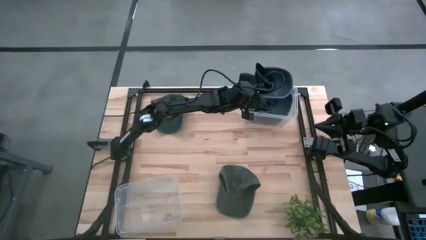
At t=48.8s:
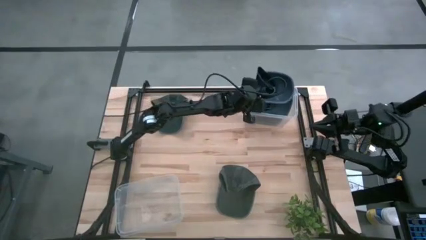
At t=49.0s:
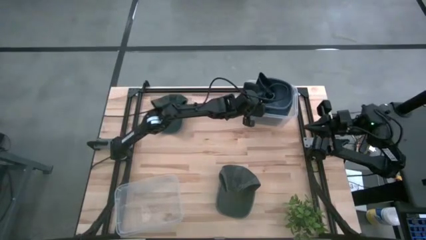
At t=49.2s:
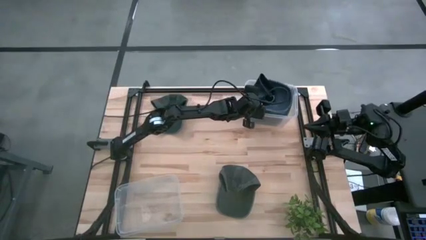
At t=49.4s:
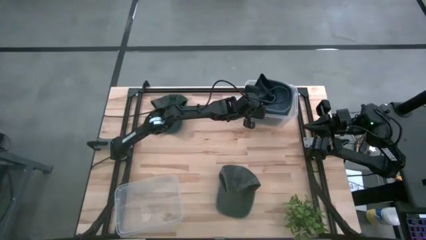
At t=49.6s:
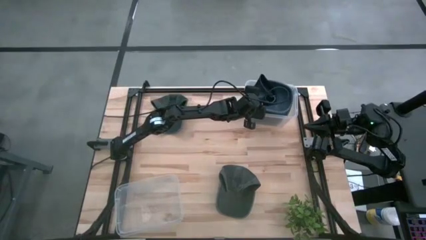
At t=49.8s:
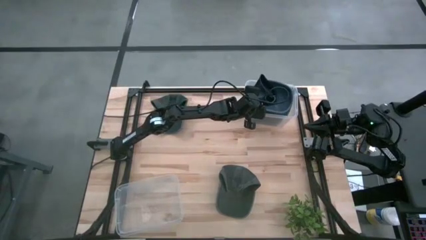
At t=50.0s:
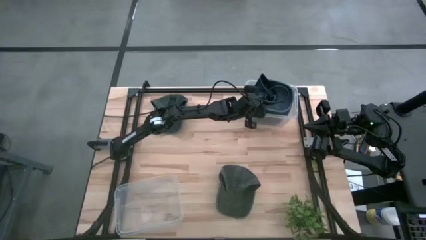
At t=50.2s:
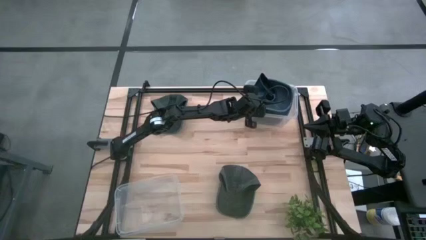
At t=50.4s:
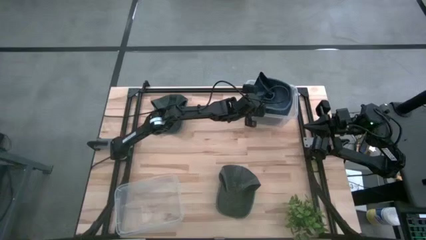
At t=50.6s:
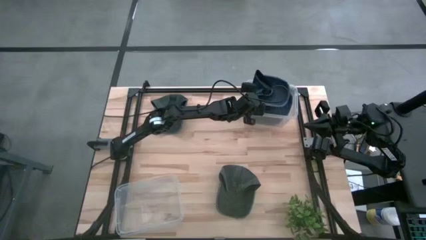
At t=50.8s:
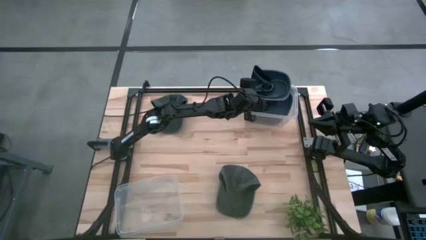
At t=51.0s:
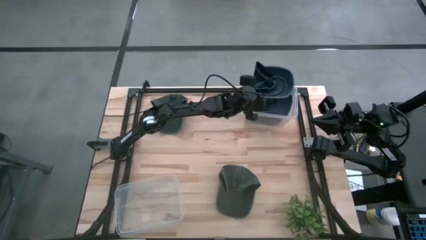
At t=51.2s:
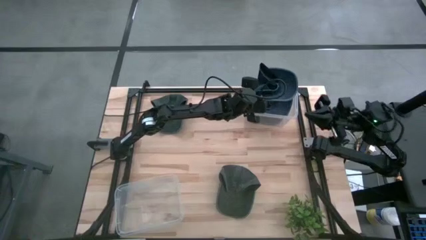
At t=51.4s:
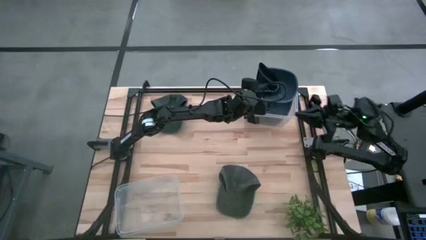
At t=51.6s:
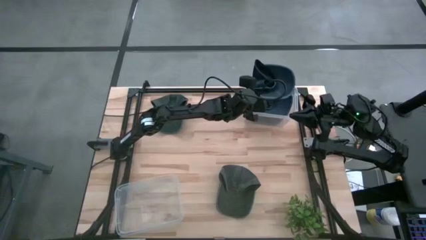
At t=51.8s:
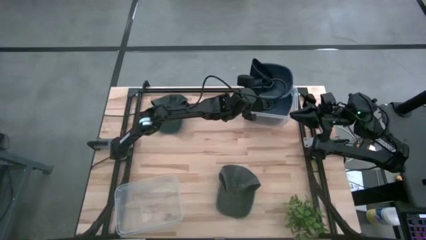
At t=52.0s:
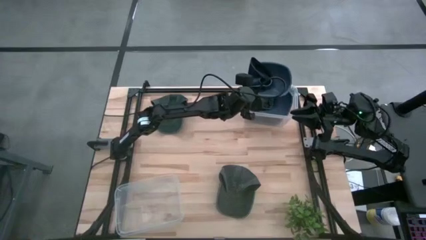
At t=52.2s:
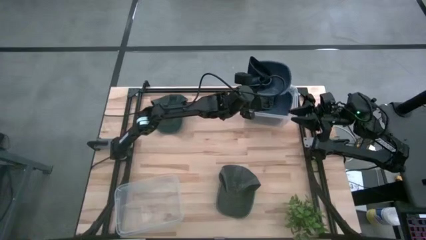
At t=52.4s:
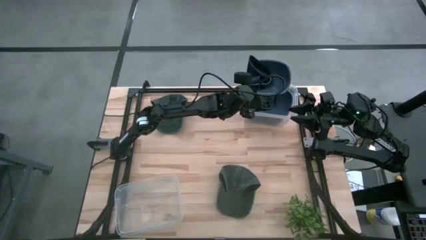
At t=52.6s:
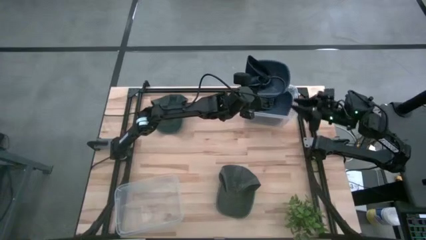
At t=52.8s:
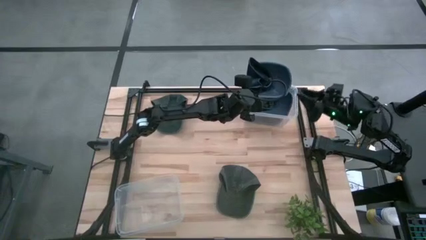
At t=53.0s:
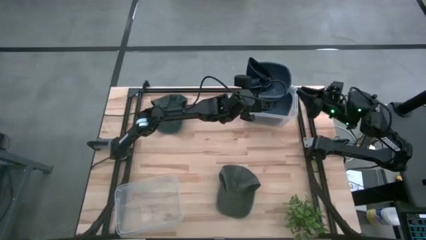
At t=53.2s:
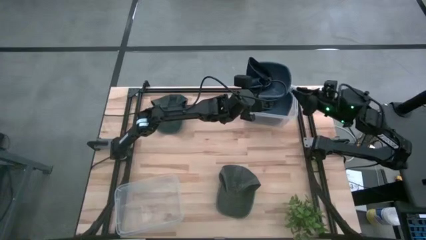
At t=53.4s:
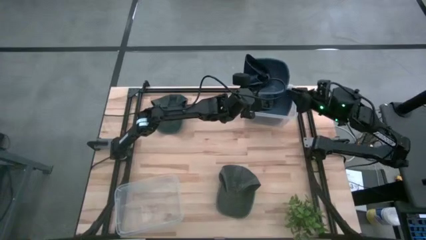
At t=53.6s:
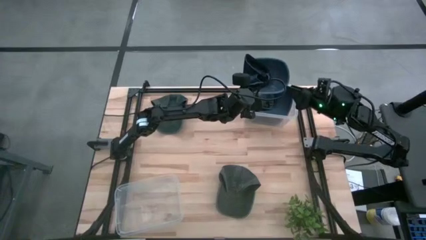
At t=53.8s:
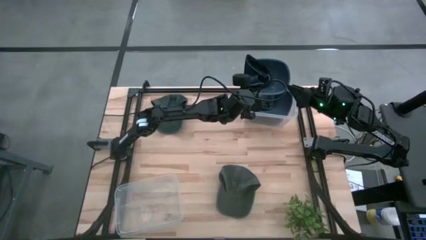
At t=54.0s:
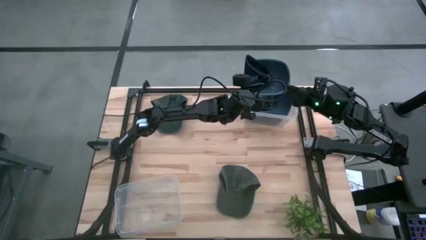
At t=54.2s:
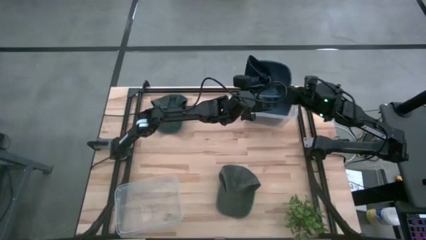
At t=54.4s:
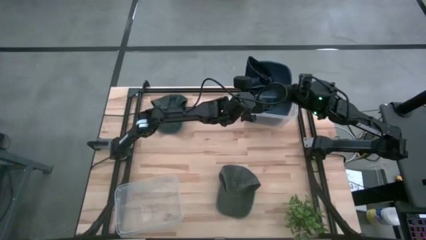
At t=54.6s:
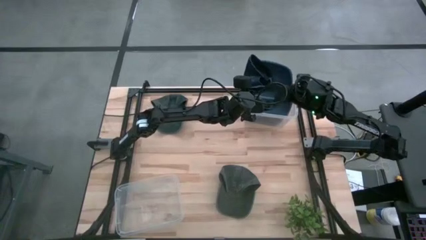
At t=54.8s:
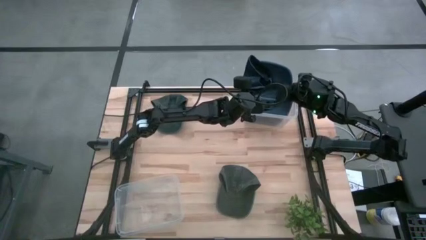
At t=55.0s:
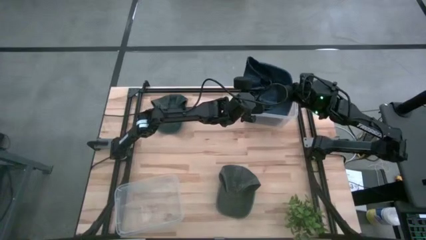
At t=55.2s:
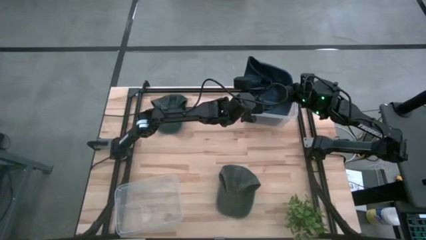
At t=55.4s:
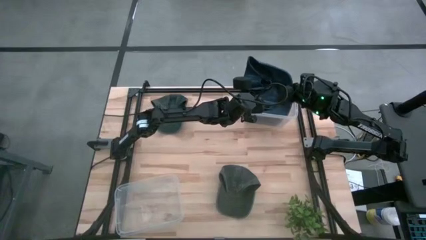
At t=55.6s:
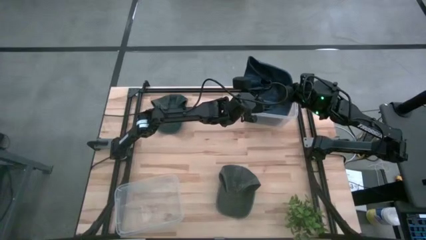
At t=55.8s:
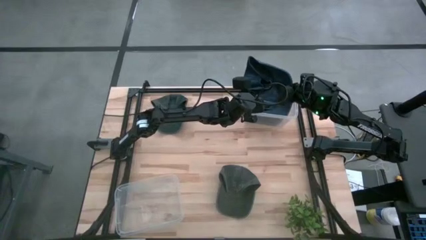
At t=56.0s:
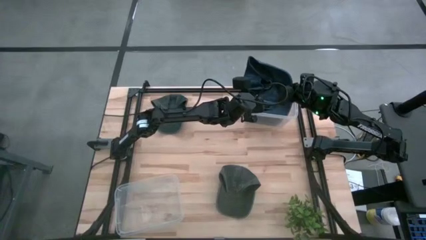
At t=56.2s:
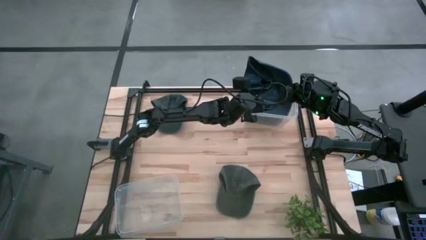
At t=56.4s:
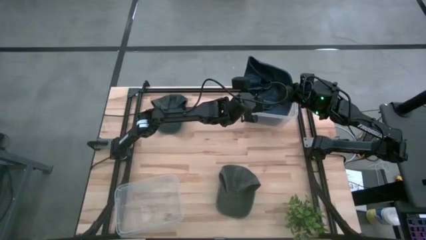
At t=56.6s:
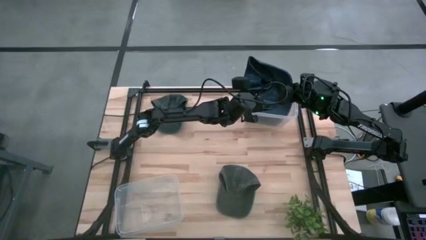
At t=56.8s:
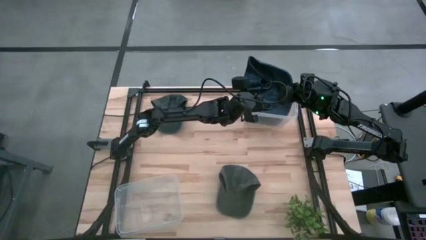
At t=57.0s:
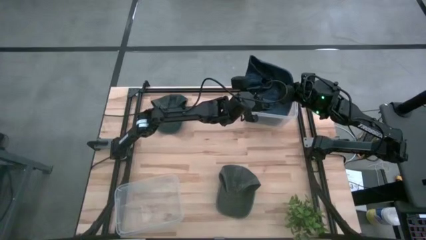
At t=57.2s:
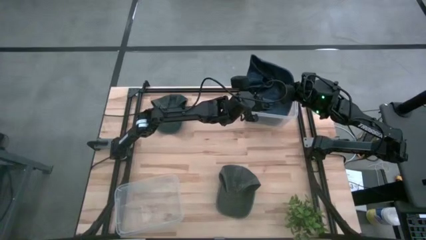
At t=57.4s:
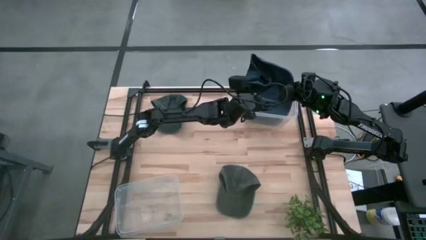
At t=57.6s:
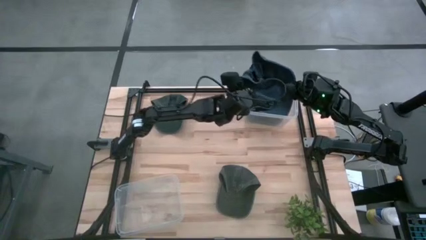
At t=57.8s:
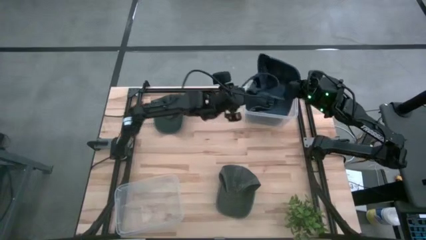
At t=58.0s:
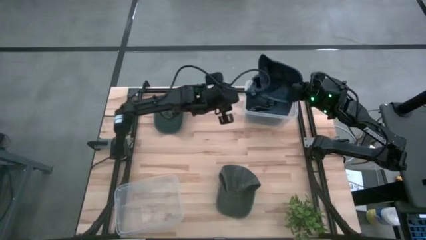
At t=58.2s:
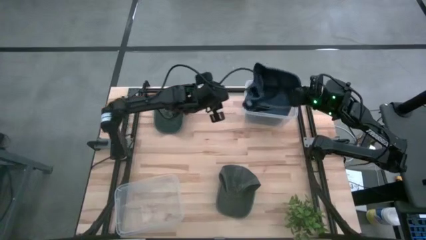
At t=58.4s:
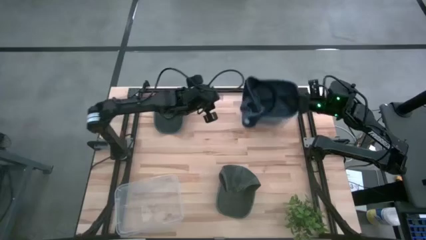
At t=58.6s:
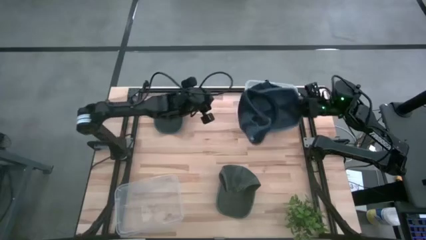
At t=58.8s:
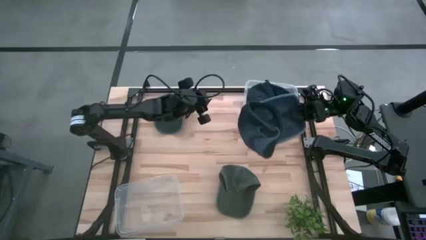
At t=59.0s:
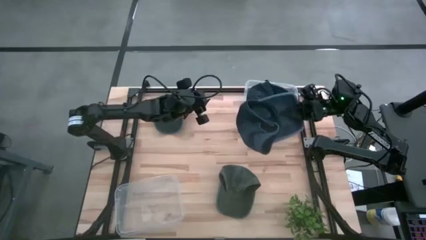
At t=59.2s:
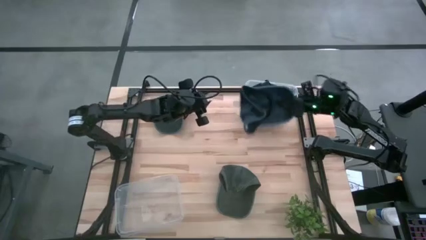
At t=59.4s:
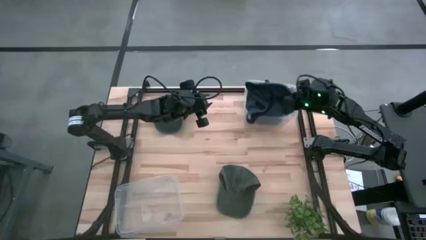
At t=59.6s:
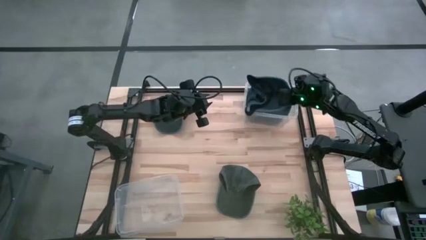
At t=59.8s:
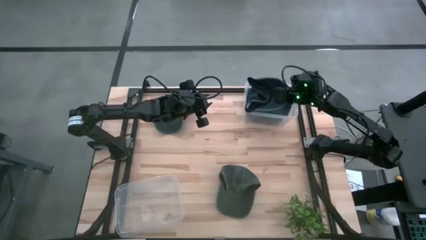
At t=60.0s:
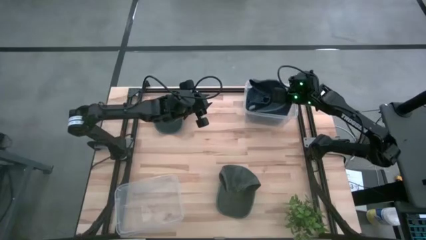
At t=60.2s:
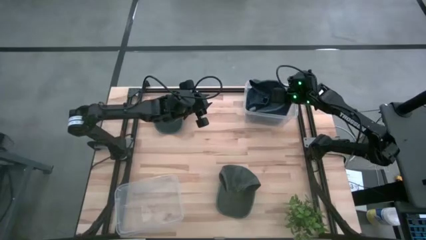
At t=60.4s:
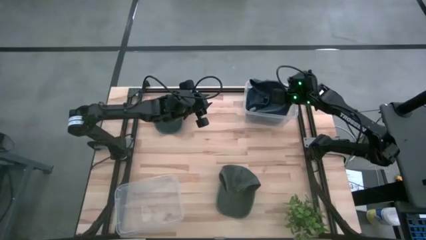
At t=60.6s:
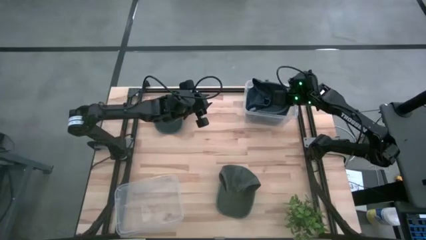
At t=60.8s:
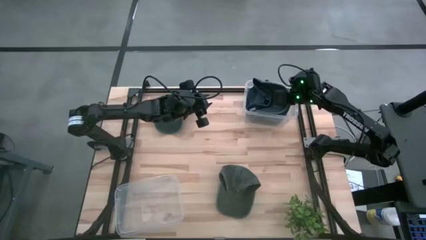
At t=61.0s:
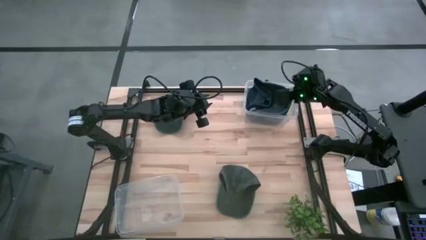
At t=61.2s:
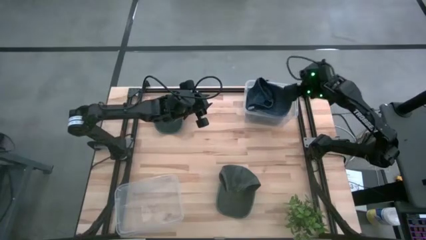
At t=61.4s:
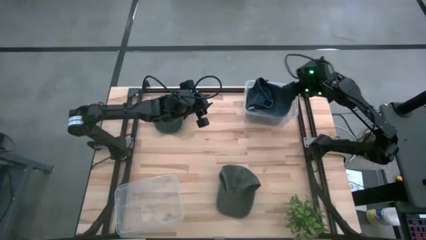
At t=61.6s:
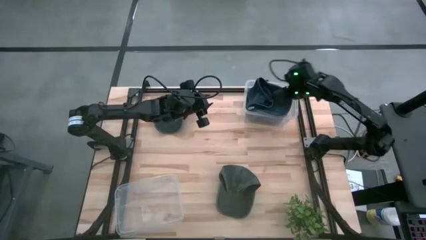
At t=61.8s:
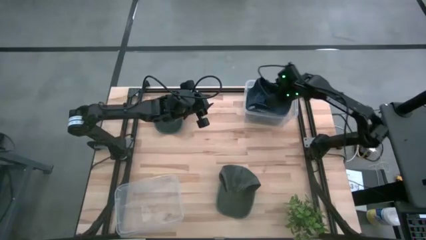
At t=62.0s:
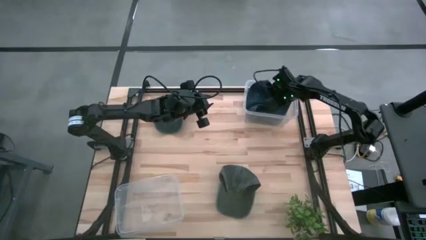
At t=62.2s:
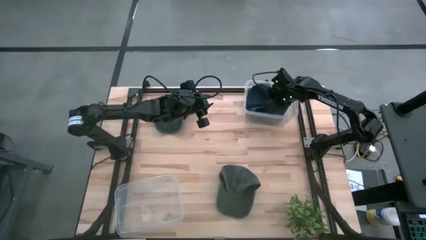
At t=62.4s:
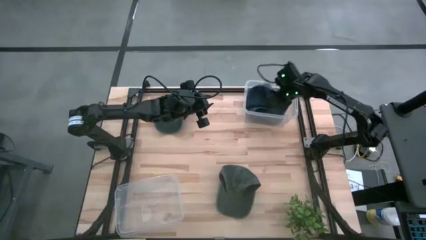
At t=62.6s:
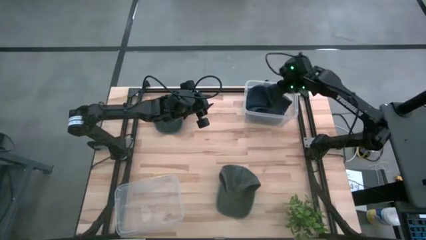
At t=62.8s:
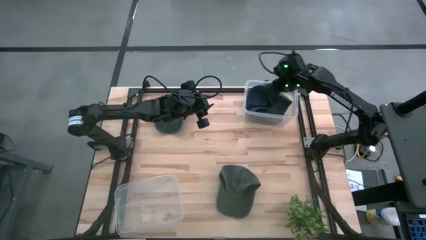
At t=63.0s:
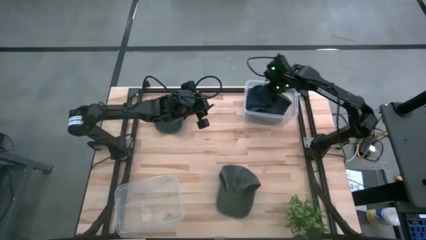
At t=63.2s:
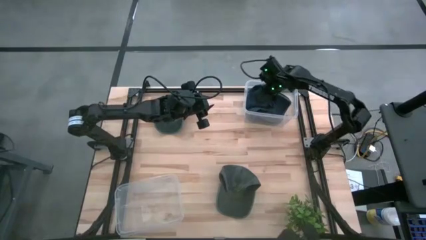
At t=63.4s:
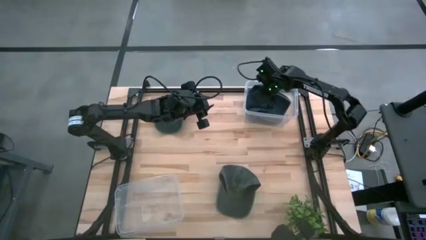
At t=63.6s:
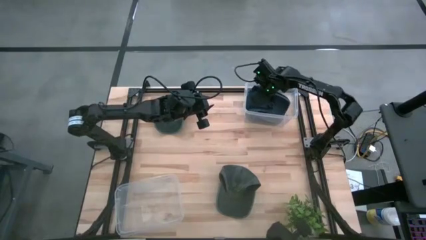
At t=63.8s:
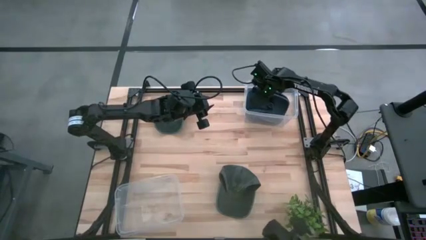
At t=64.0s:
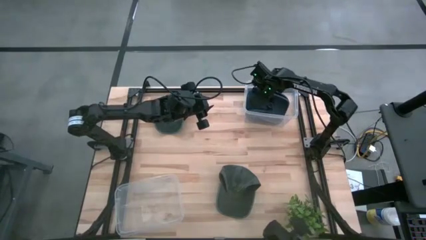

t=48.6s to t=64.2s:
Task: Pick & Place hat
Put the blue cap into the top transparent bin
